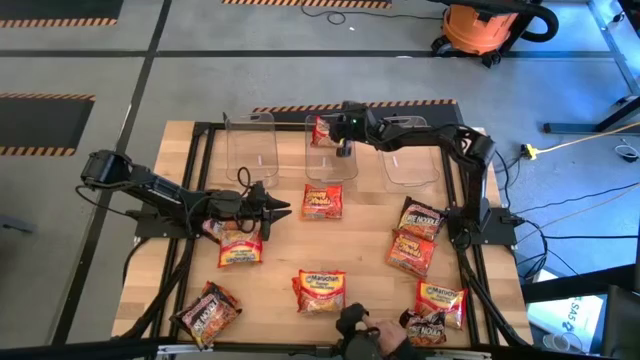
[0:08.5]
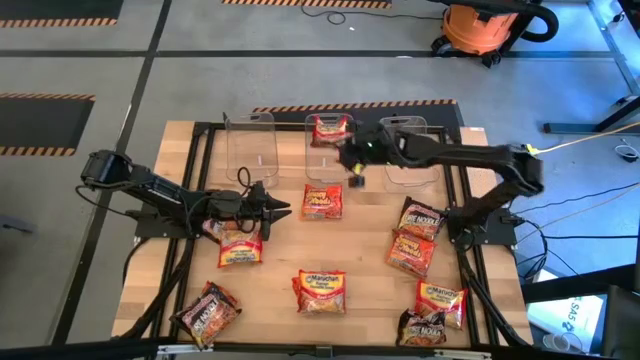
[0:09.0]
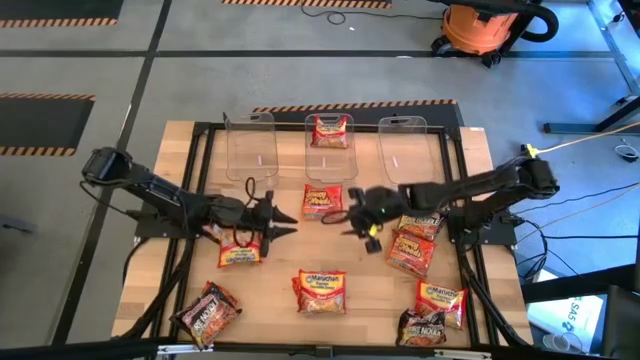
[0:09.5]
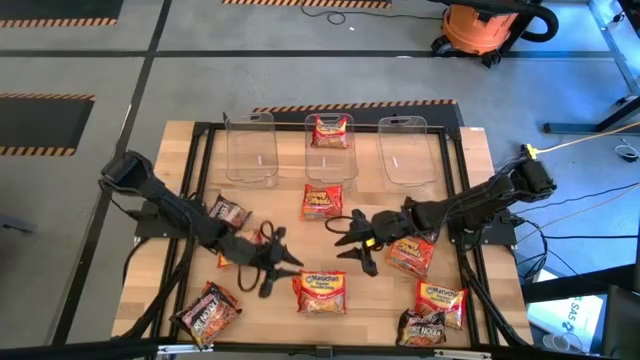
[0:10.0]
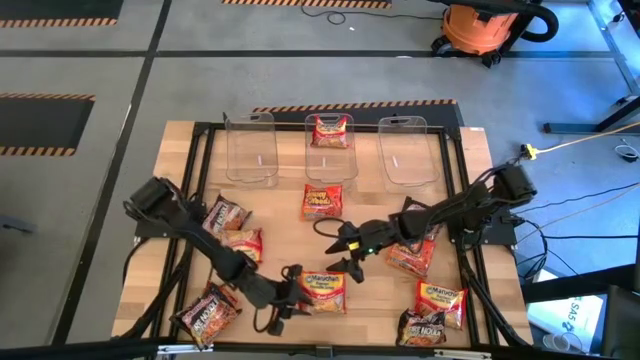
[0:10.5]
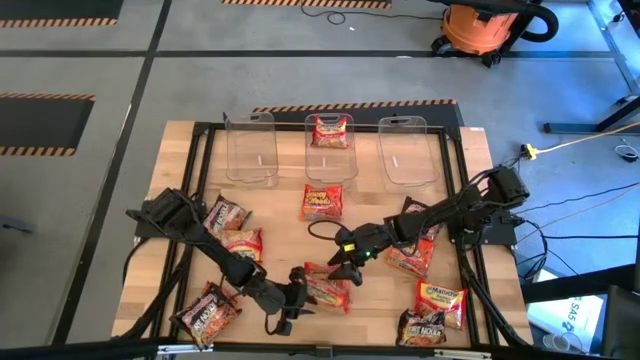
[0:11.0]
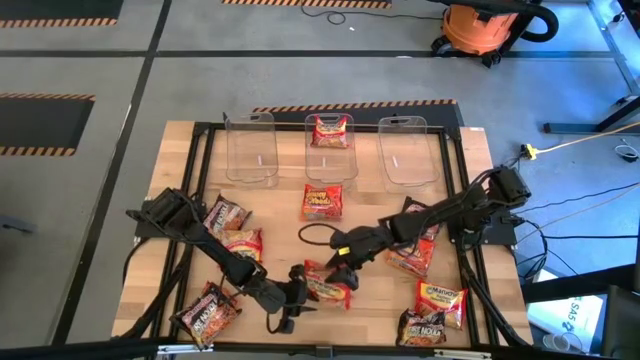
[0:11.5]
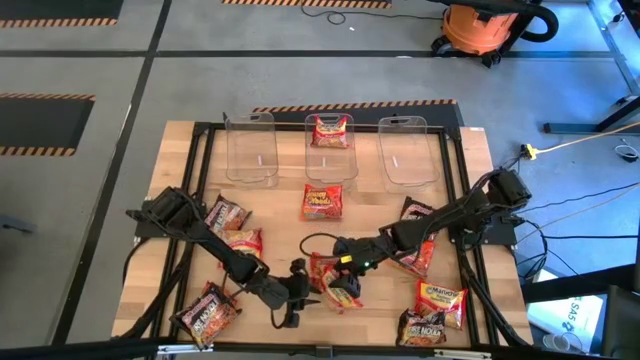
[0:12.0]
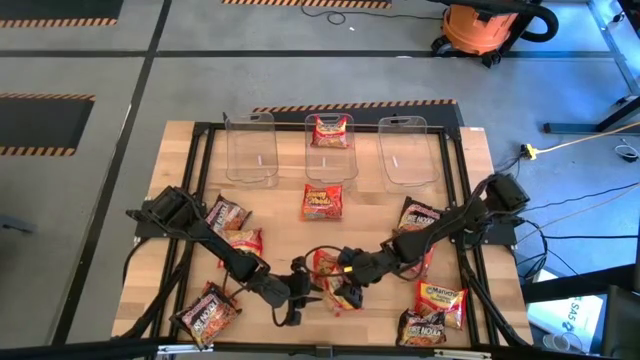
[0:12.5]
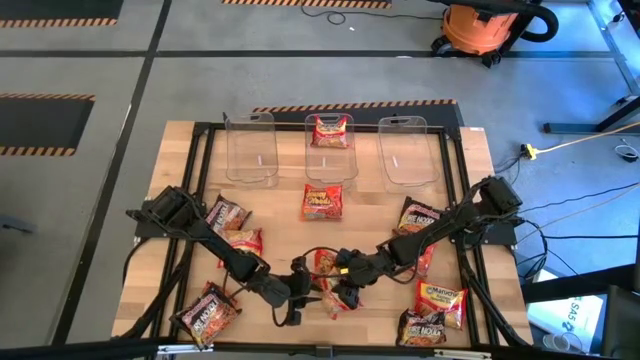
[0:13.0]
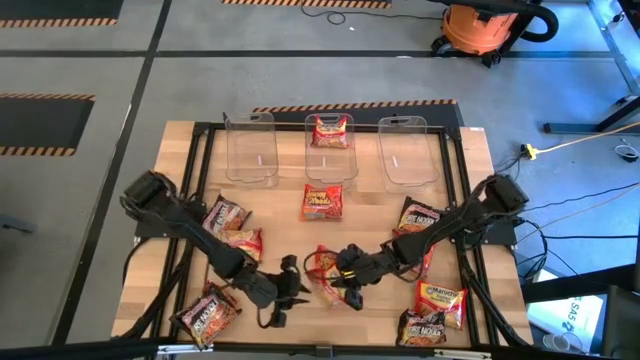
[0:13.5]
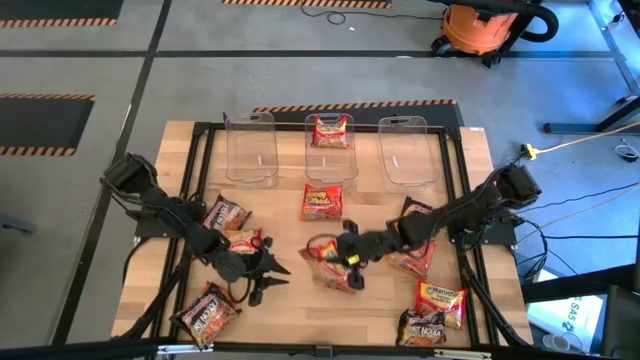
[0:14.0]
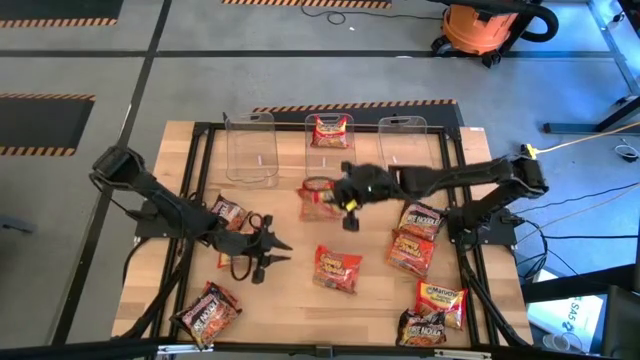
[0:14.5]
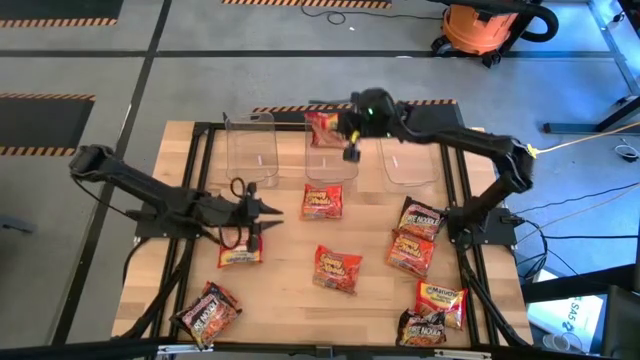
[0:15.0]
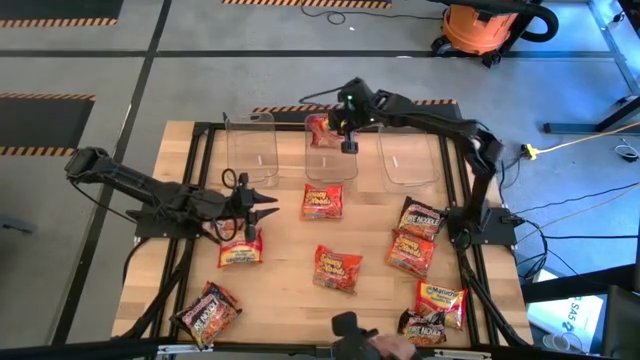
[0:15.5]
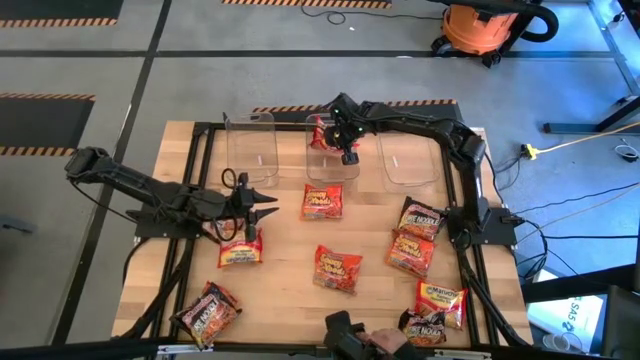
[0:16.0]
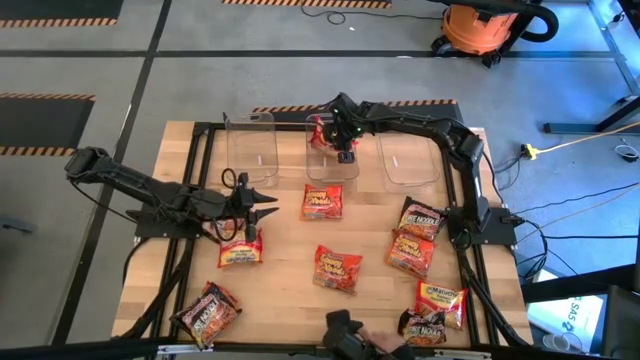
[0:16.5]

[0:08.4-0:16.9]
Task: Sort Maruchan noodles
Put the red noodle pack into the middle transparent bin

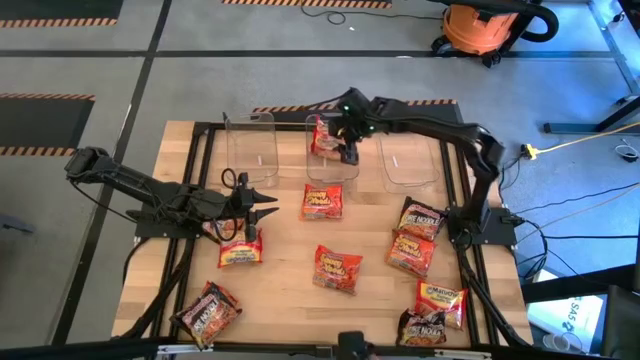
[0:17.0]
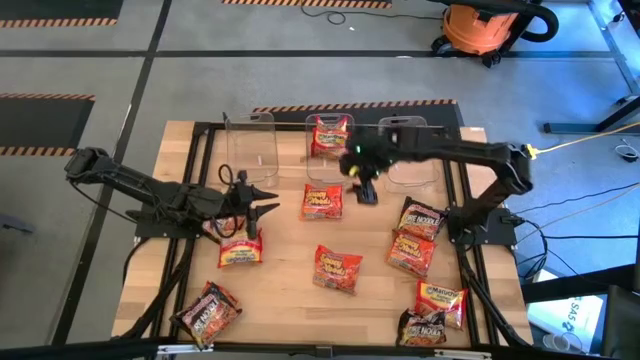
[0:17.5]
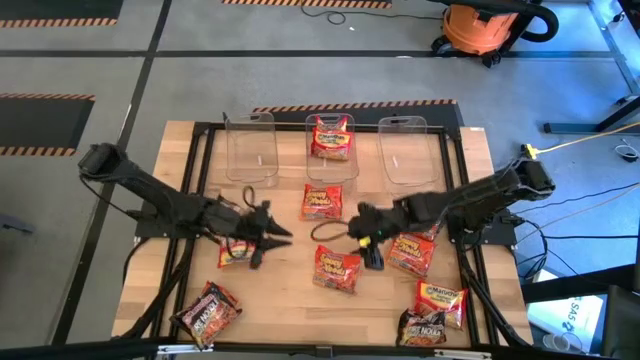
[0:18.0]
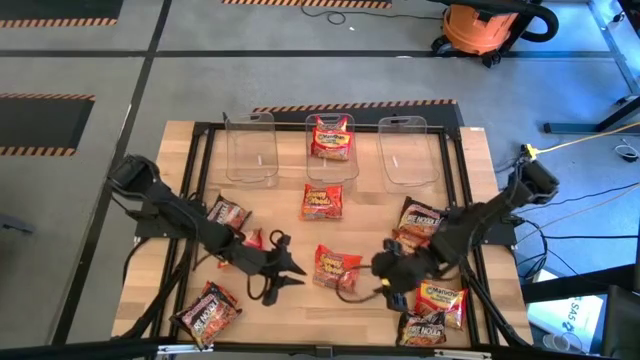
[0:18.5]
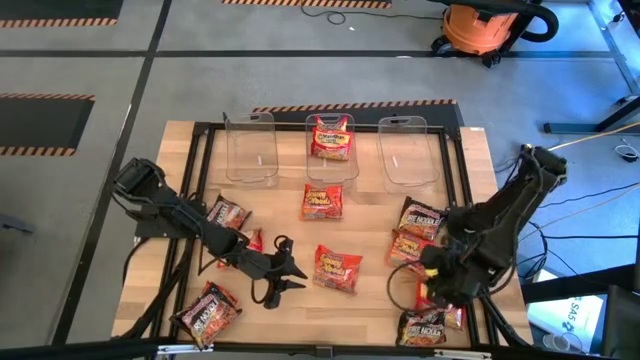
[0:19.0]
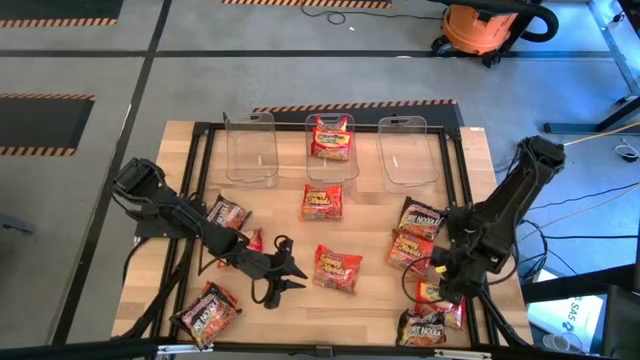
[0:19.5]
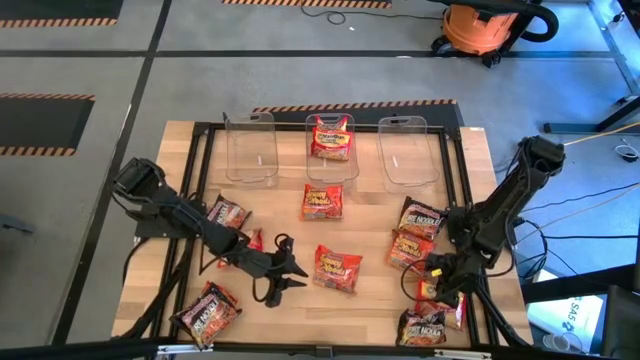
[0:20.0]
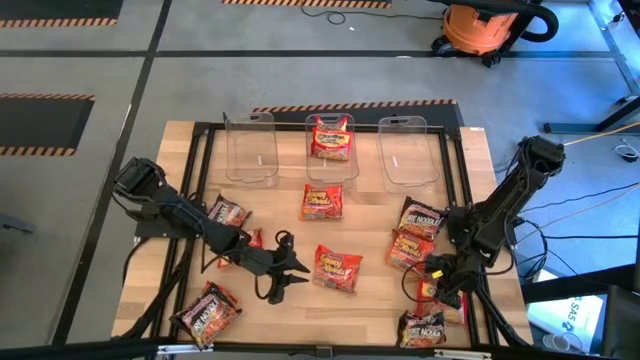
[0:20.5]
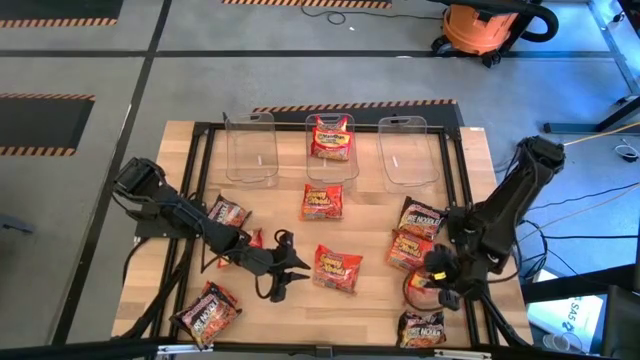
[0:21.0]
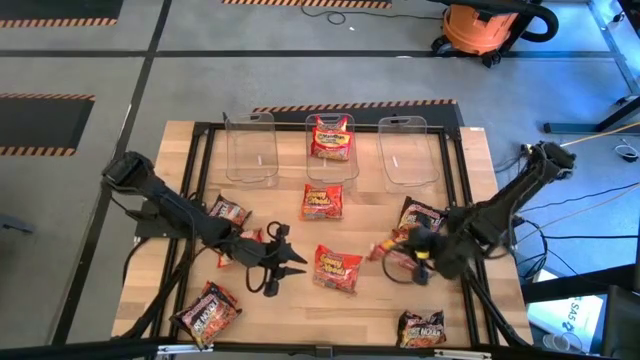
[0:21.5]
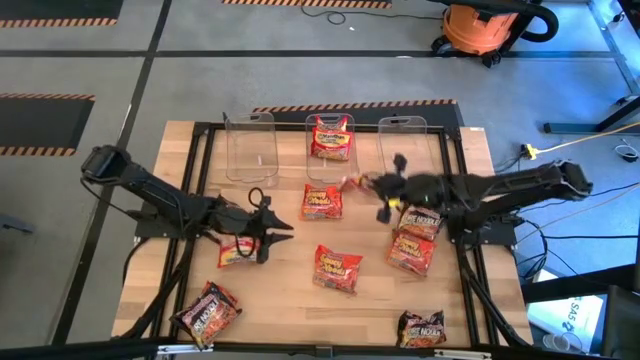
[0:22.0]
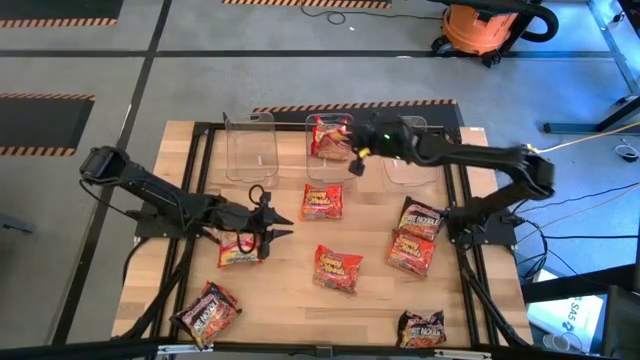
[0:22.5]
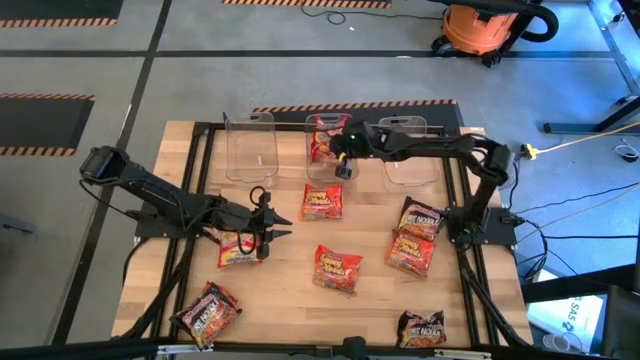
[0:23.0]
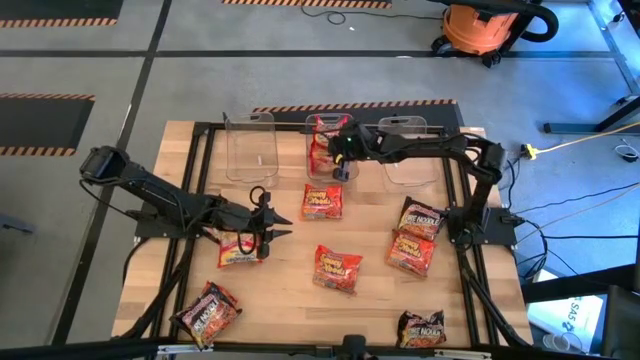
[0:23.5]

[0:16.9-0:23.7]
Put the red noodle pack into the middle transparent bin

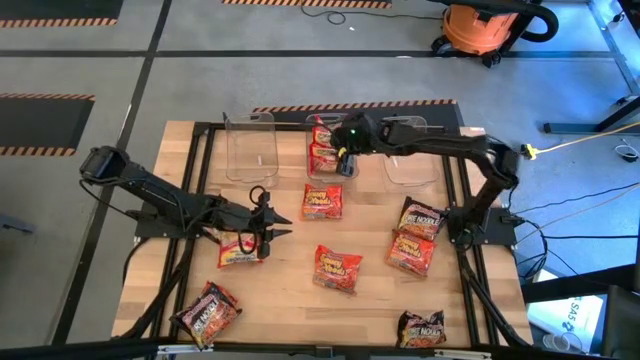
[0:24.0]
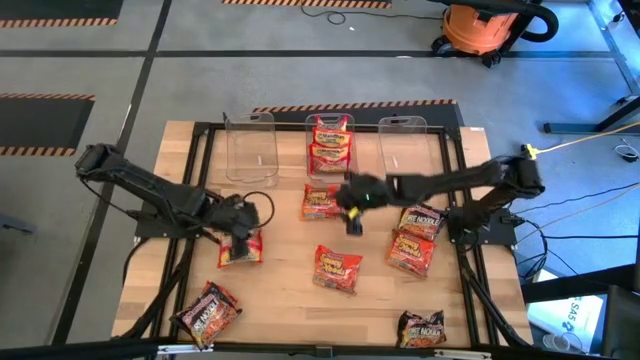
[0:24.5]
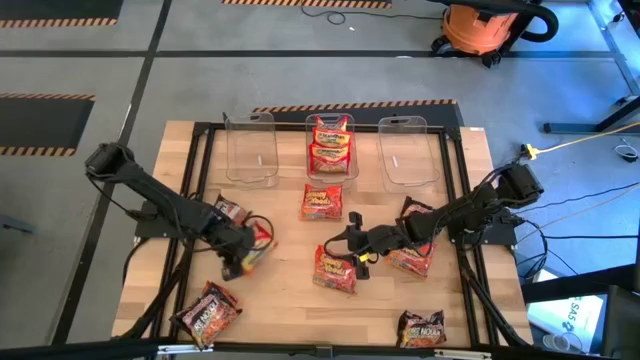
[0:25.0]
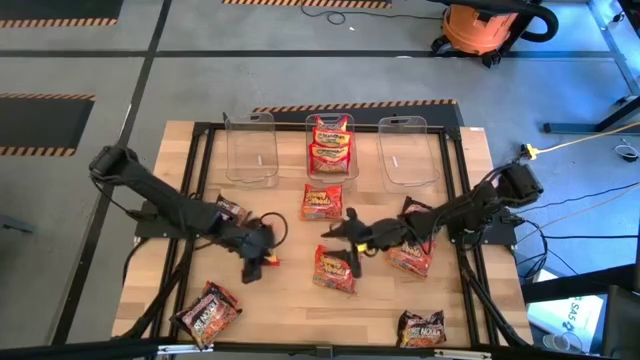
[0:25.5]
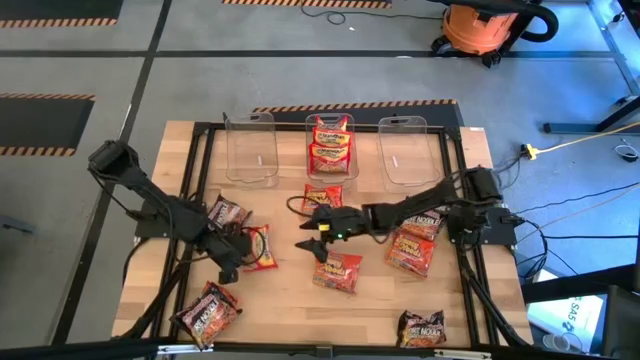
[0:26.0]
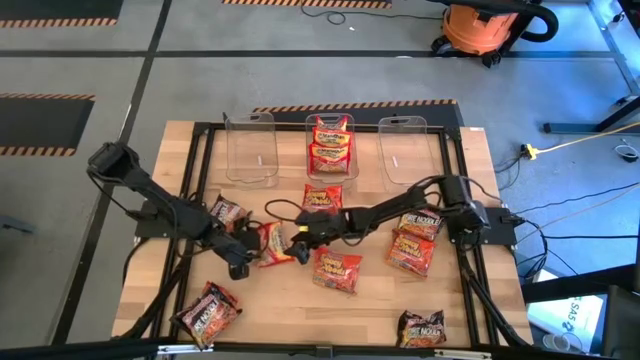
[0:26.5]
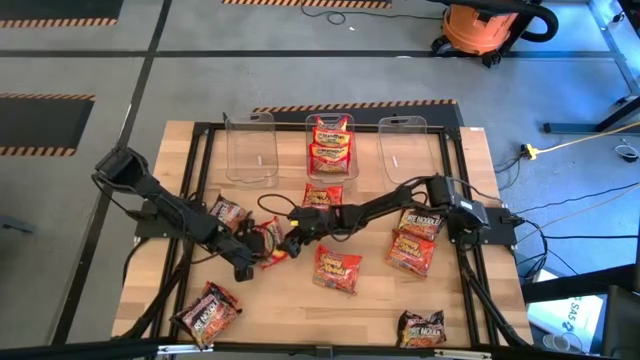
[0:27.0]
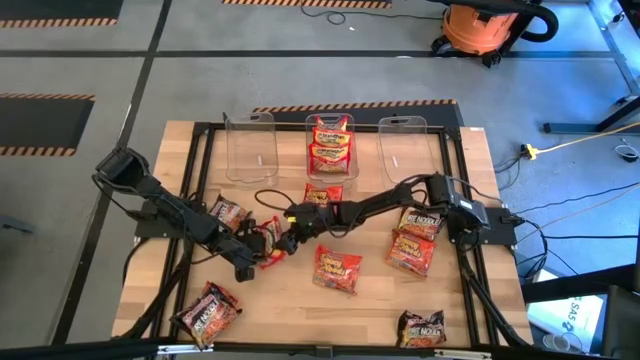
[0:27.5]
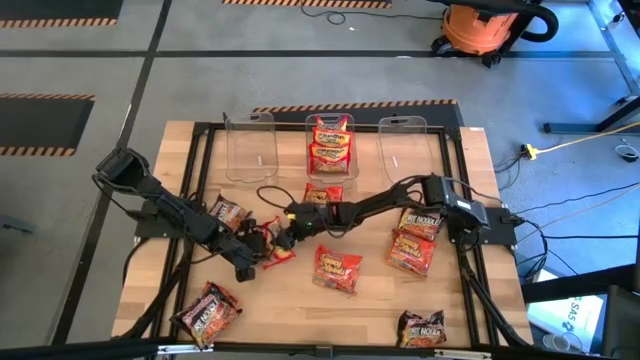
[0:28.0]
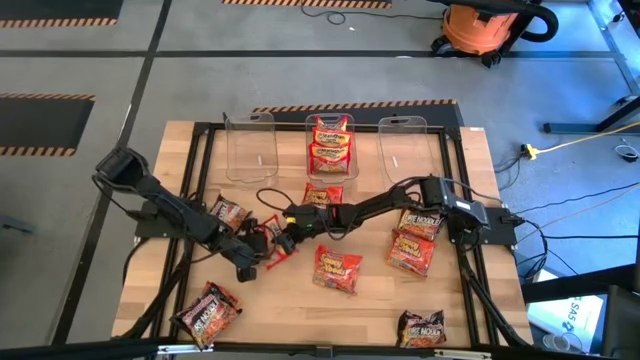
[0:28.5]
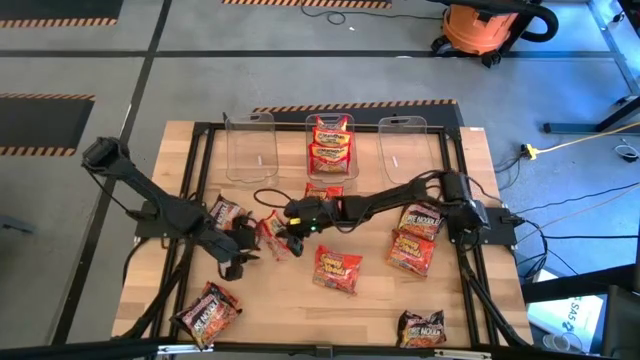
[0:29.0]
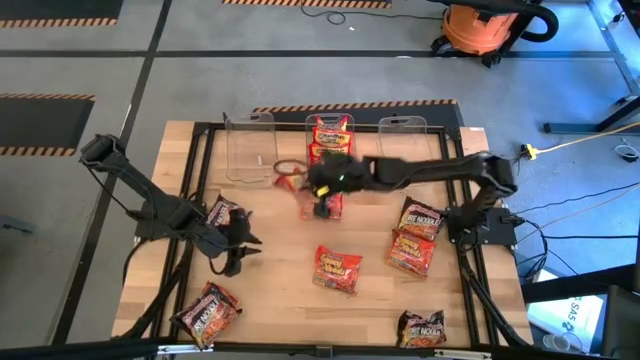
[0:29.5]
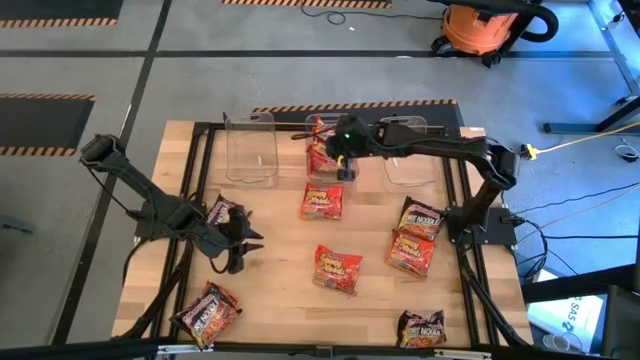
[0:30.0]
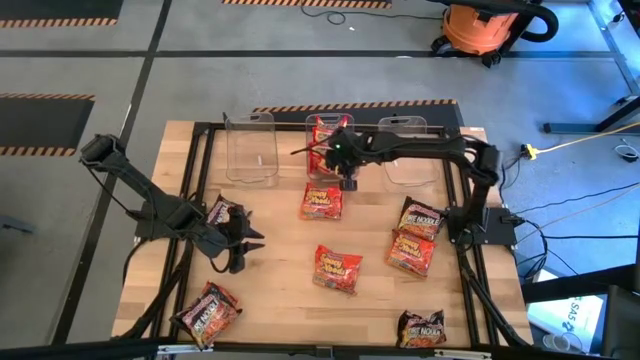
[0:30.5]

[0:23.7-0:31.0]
Put the red noodle pack into the middle transparent bin
